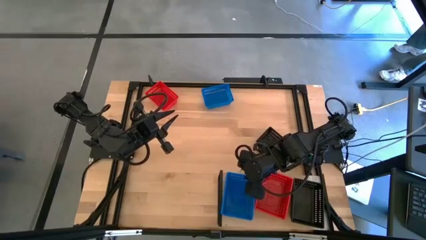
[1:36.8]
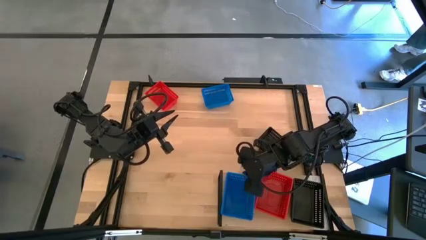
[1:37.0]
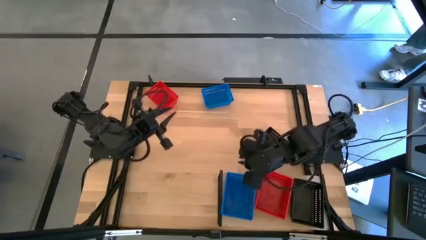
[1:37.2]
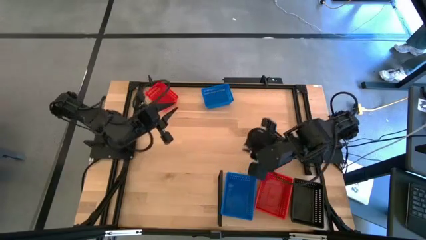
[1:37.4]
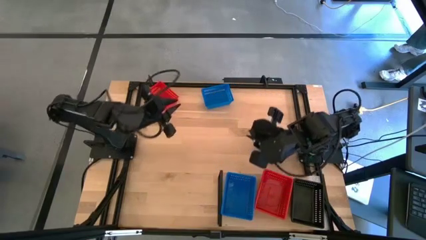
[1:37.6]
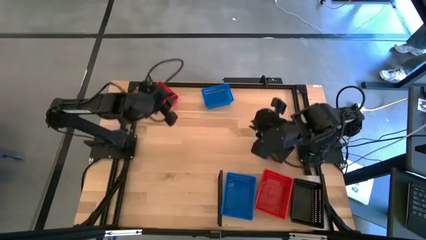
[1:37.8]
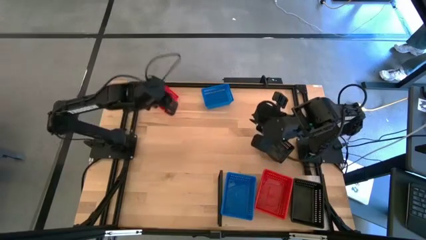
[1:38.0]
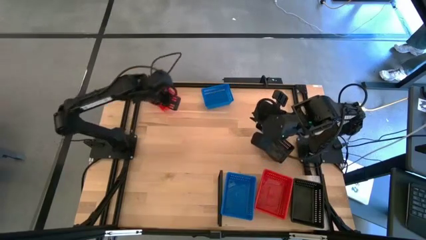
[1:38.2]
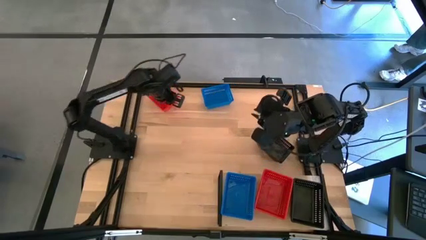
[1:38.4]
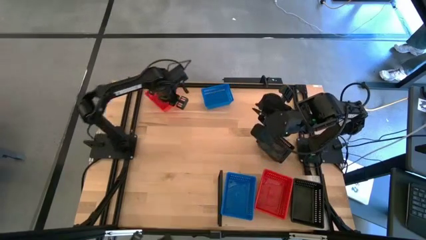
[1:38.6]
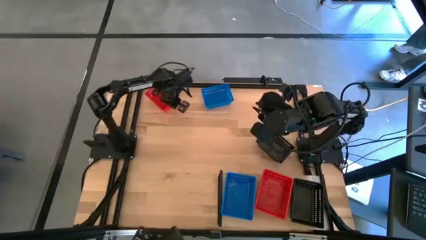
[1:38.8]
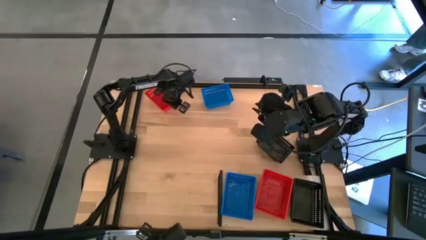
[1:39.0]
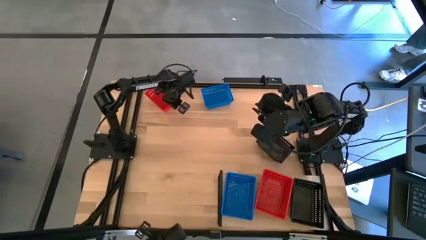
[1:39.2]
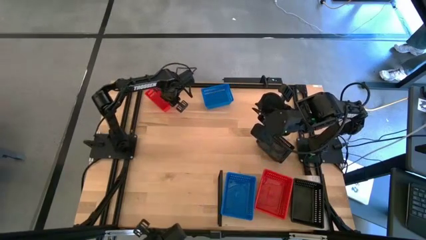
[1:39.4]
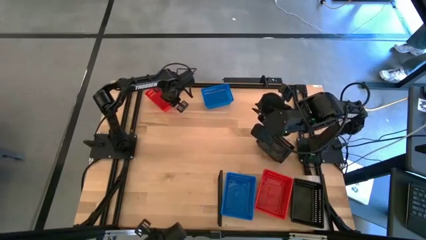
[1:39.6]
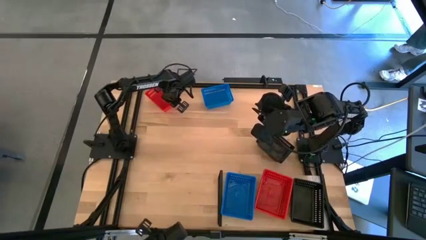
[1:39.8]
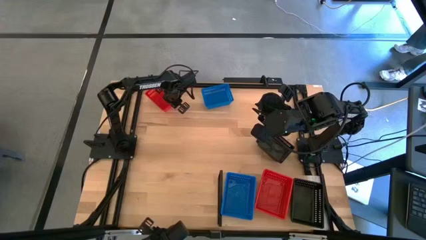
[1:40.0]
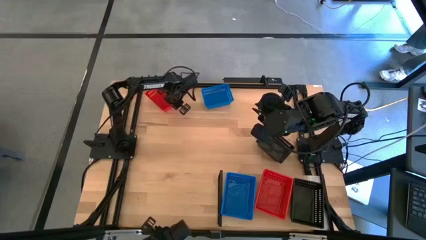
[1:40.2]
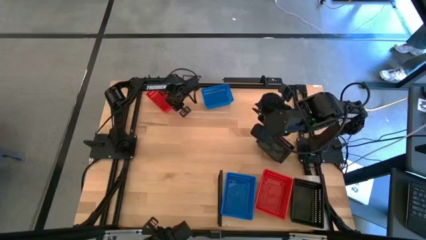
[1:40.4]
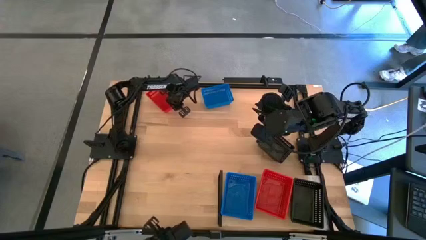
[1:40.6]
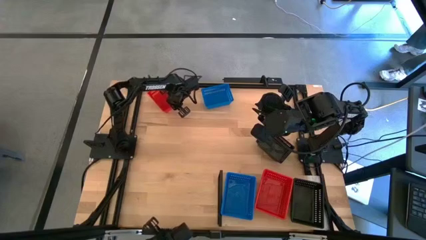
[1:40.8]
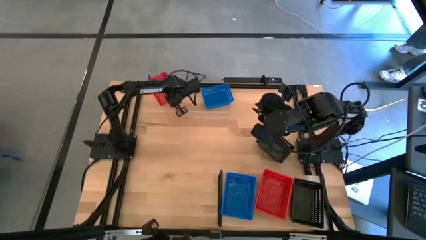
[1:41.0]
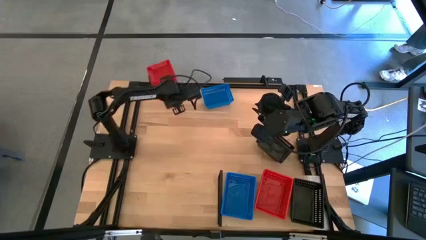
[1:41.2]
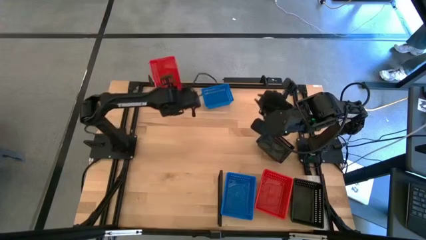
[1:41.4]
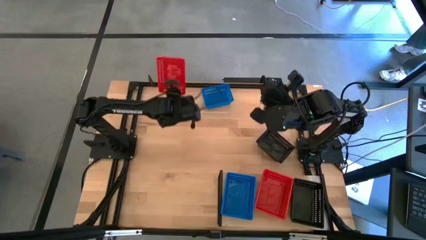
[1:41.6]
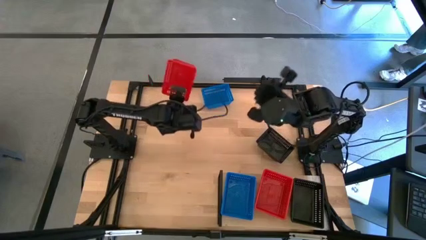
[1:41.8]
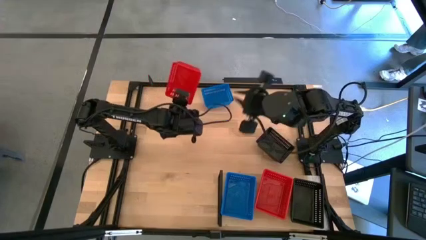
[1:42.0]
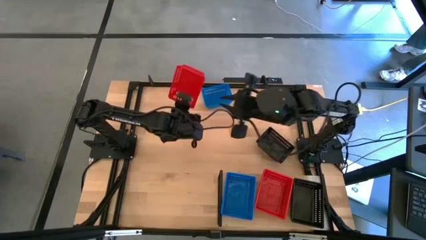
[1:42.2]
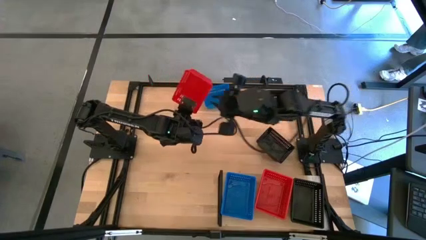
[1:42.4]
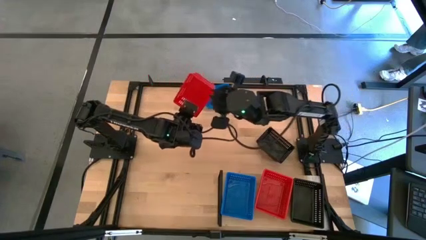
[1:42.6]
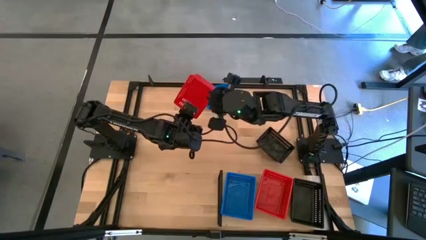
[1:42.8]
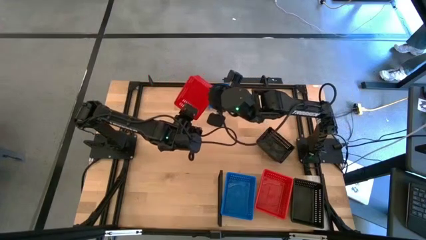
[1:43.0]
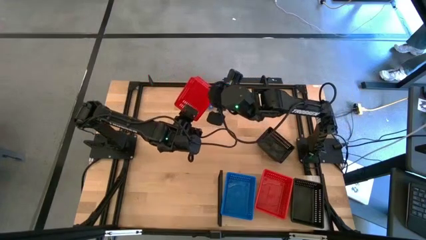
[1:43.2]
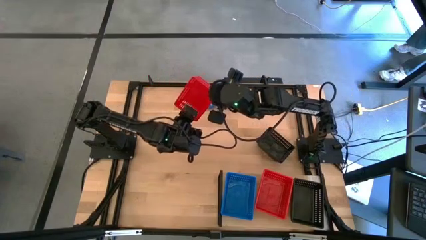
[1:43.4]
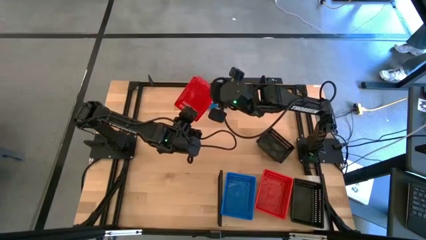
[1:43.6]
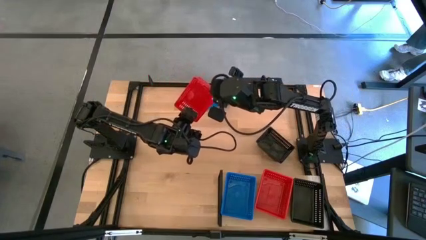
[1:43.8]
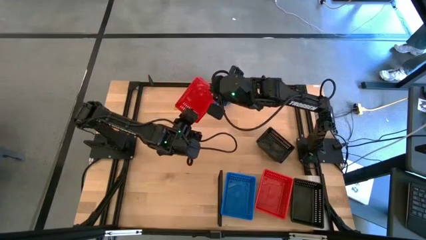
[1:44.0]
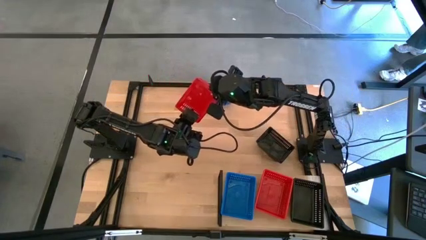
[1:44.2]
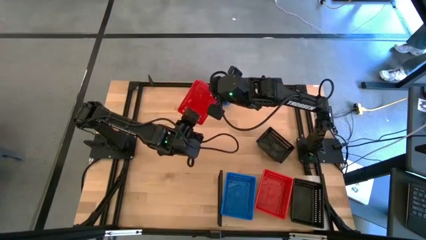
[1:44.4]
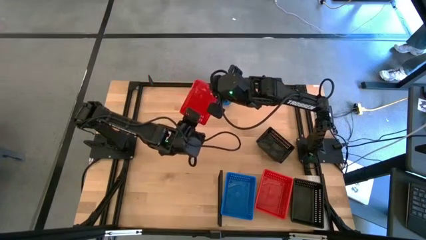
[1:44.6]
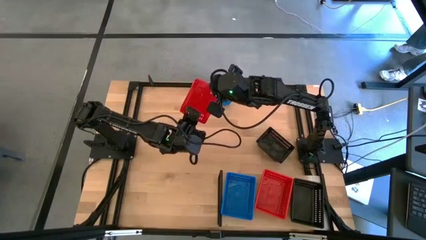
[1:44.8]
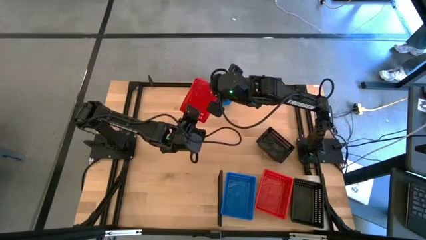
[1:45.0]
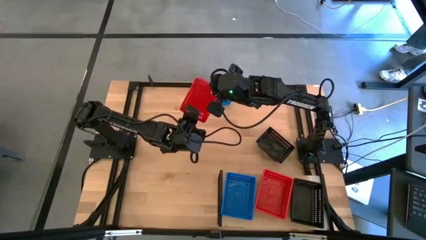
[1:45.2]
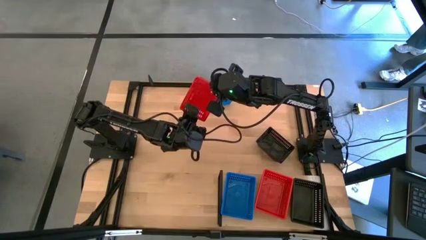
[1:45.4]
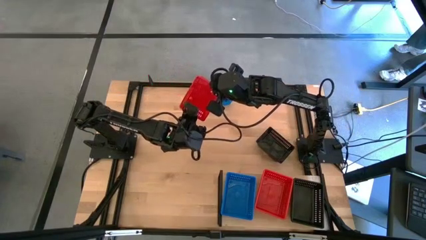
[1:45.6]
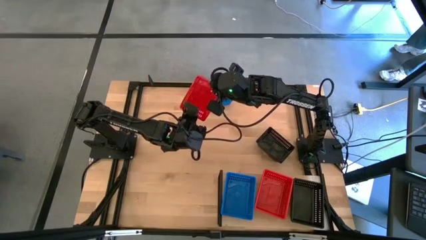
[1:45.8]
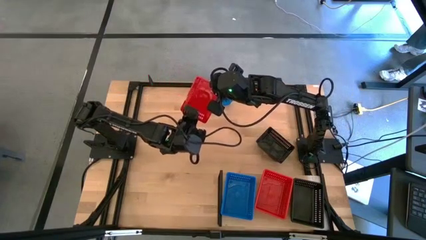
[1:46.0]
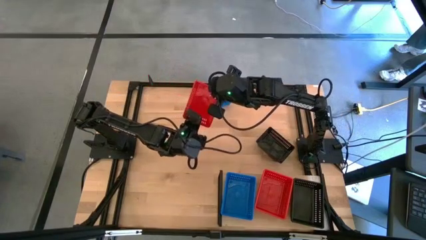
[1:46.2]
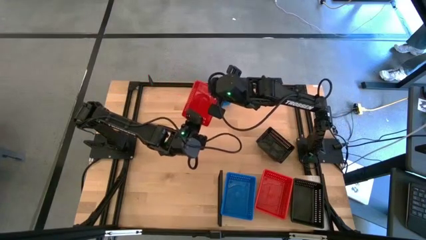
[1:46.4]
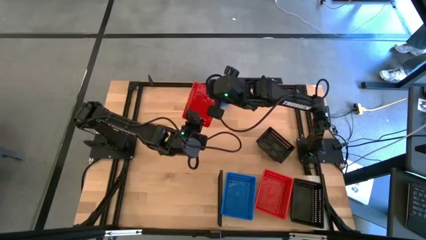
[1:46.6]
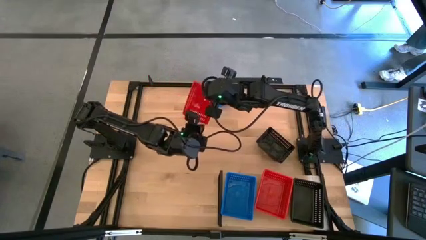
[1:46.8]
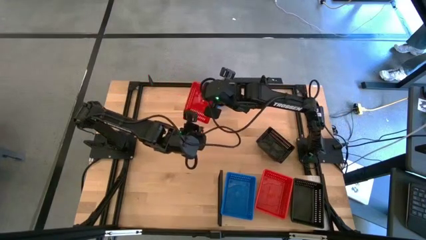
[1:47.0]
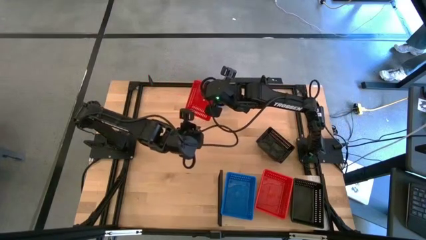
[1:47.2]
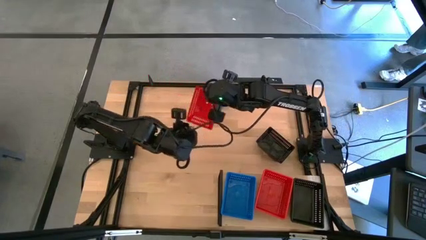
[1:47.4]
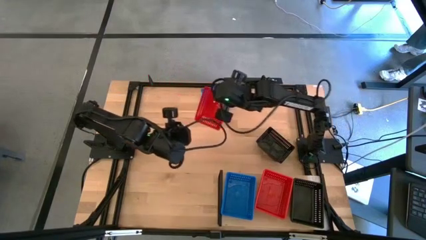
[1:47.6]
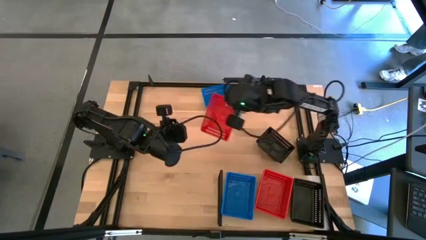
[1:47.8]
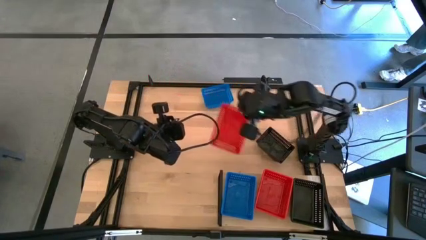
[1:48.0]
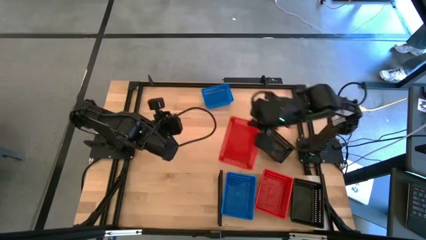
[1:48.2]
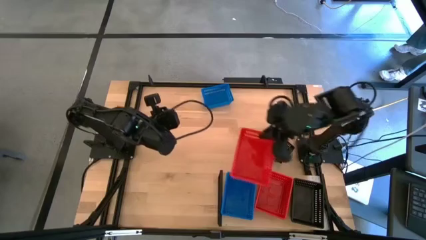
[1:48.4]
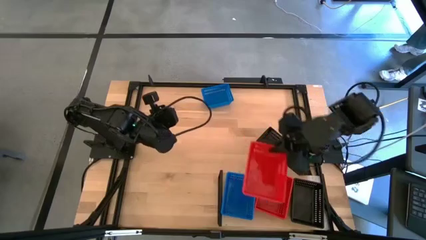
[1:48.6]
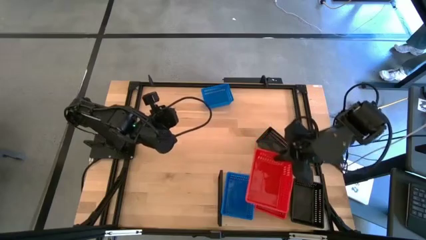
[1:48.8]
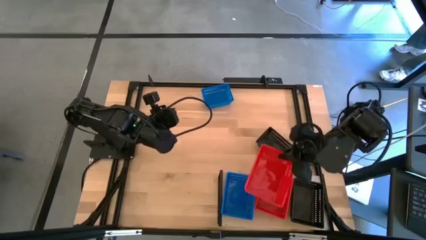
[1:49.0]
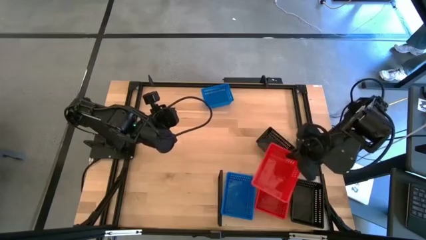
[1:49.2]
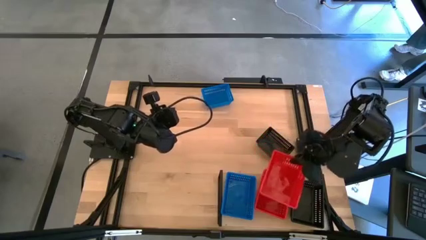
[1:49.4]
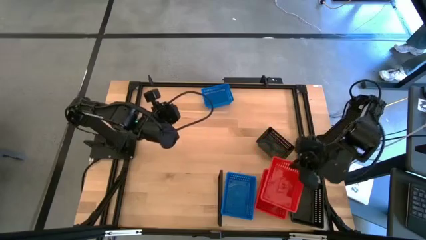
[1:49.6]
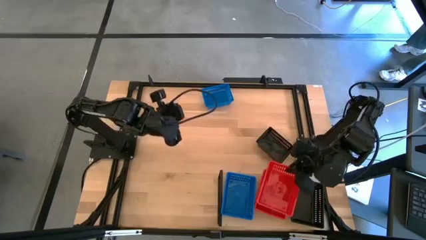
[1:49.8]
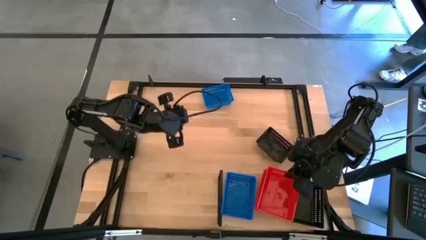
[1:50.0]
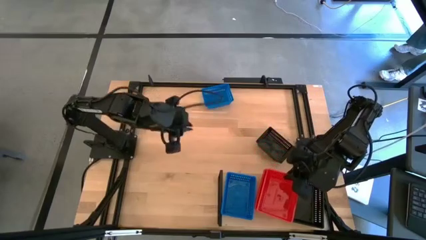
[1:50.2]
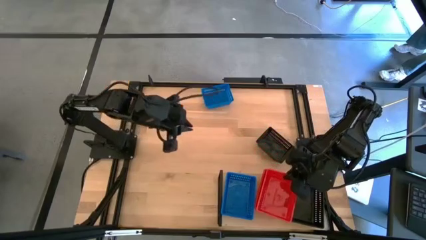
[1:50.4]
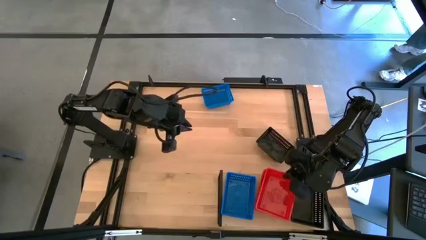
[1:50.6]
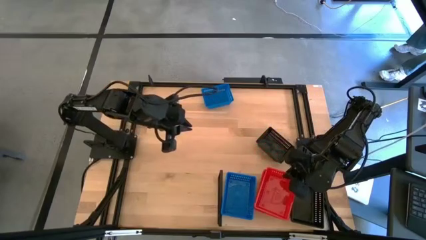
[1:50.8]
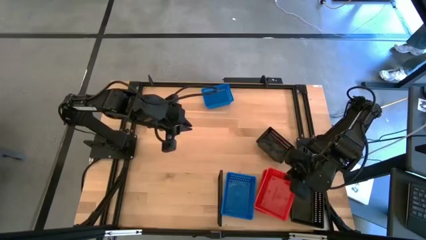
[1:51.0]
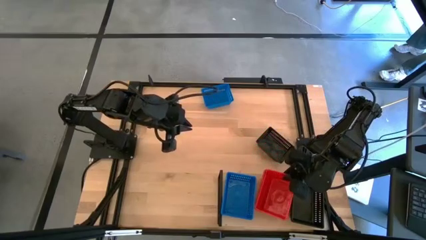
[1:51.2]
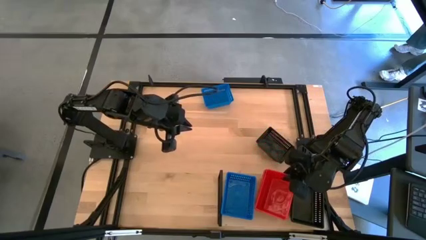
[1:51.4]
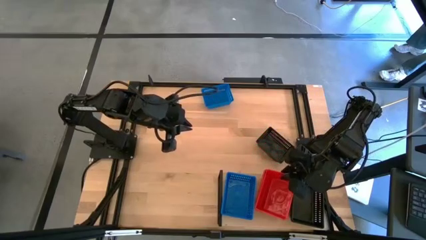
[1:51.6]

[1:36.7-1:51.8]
Task: Stack baskets on shelf by color
Stack the red bin on top of the red bins on the shelf

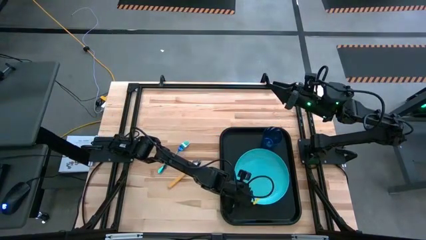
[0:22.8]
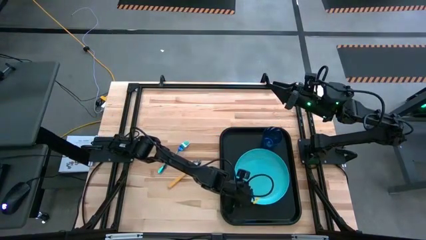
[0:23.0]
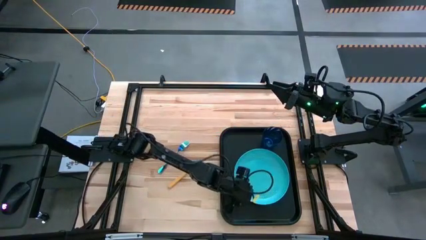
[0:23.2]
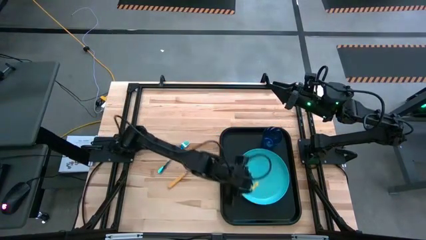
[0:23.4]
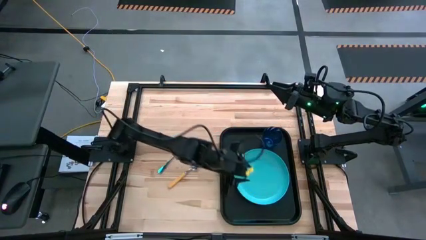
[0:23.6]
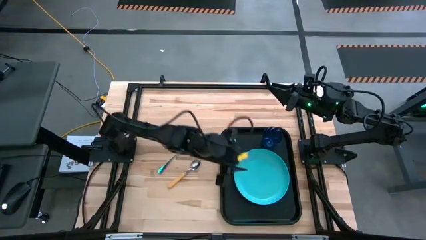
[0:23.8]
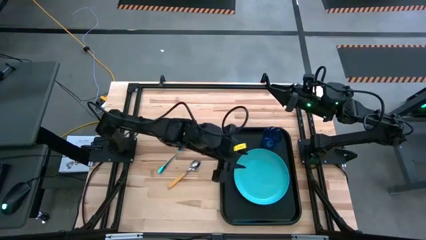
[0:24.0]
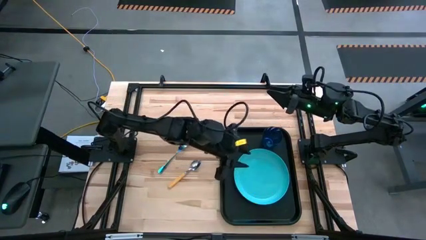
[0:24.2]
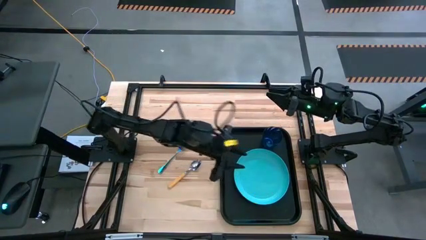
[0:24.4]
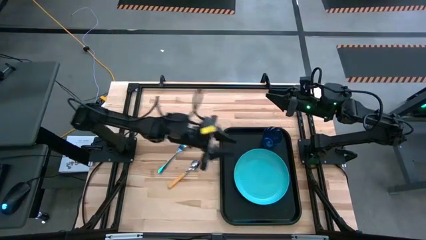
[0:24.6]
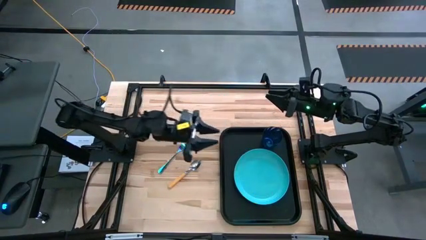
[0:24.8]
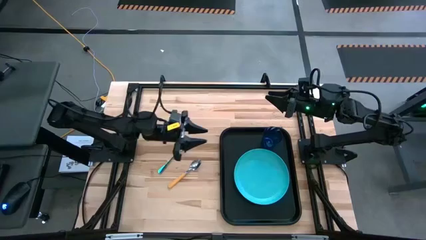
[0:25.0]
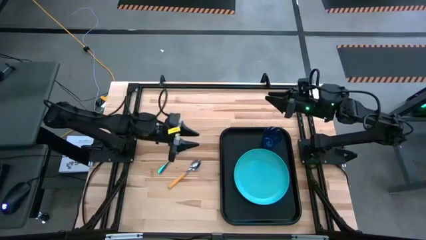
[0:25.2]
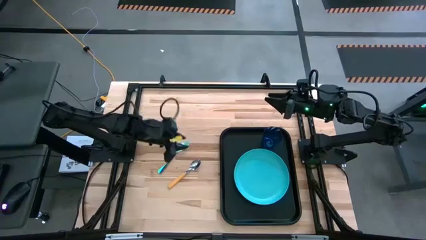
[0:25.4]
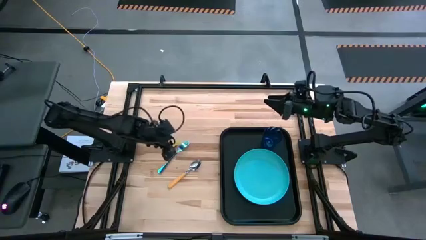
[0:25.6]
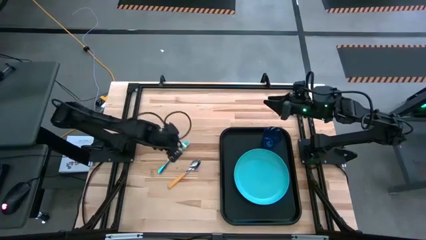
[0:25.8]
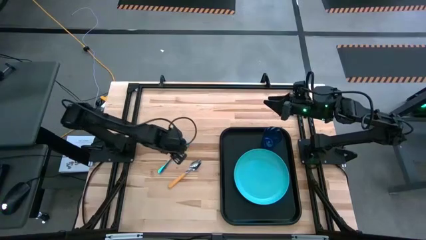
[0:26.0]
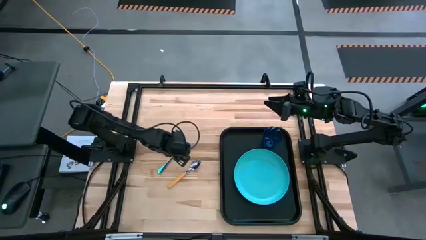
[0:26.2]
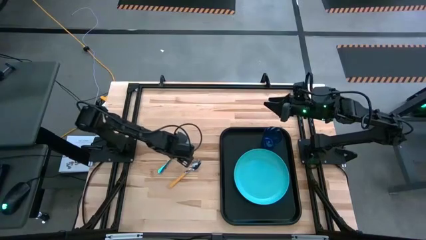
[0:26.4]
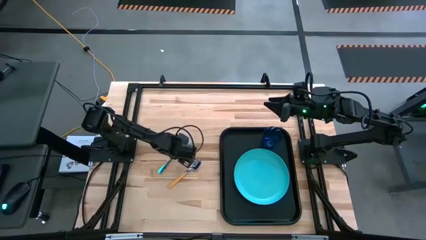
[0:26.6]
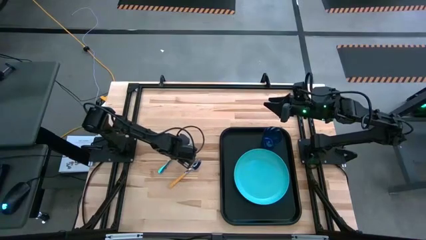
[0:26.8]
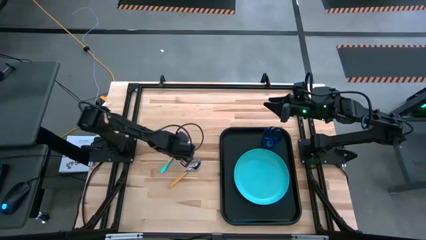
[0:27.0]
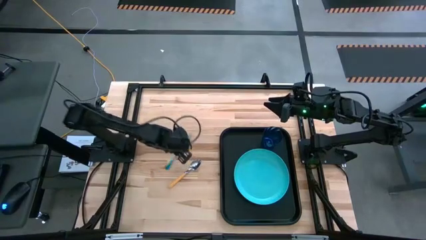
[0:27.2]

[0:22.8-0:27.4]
Task: Pick and place plate/cup/fork/spoon on tray
Put the blue fork on black serving tray to the right of the blue plate
